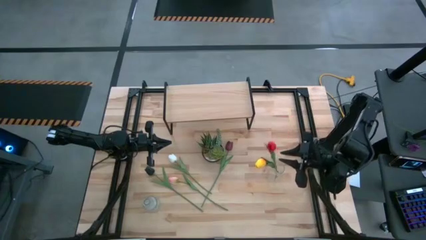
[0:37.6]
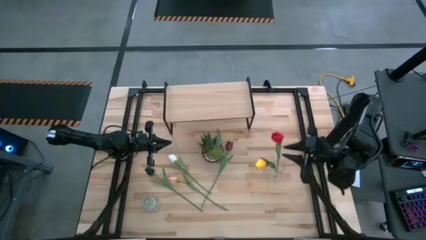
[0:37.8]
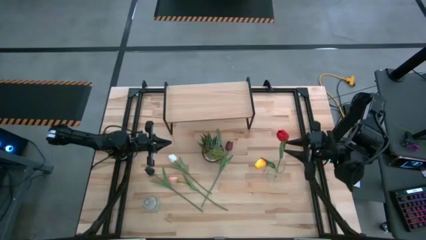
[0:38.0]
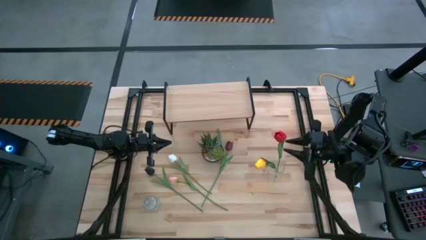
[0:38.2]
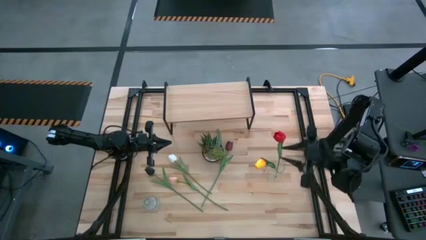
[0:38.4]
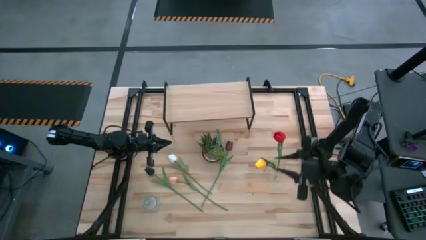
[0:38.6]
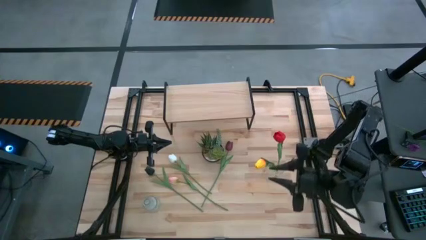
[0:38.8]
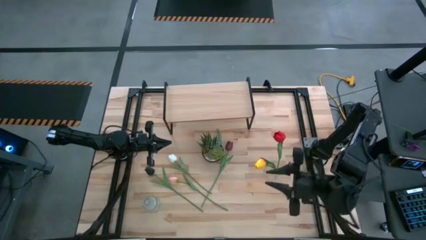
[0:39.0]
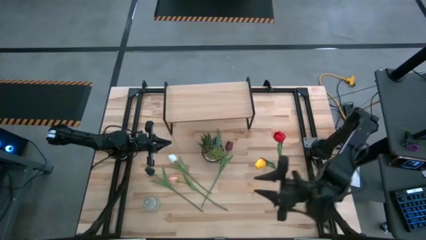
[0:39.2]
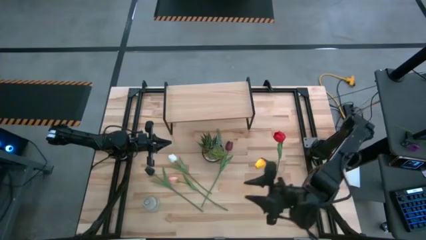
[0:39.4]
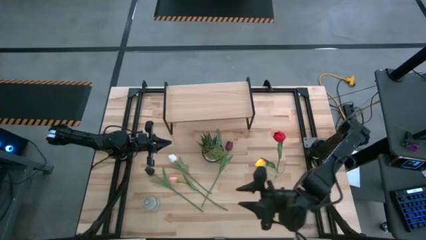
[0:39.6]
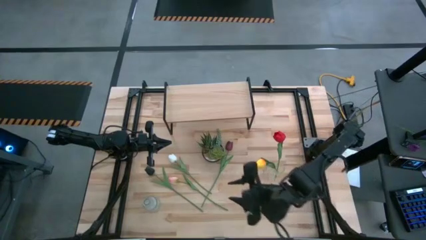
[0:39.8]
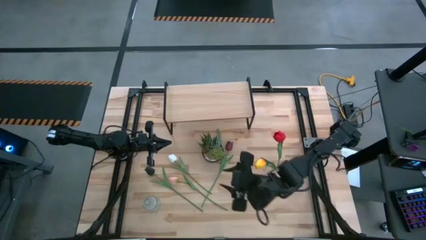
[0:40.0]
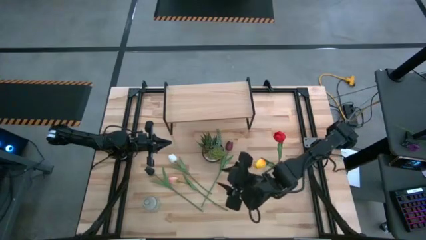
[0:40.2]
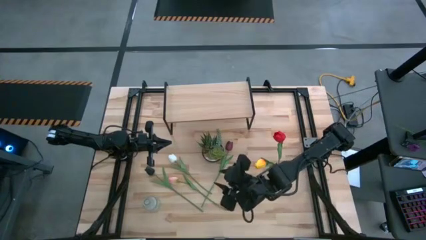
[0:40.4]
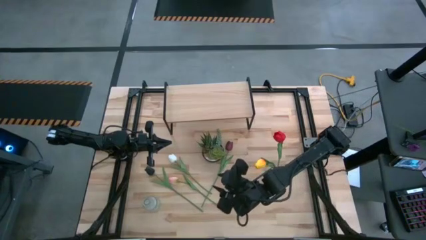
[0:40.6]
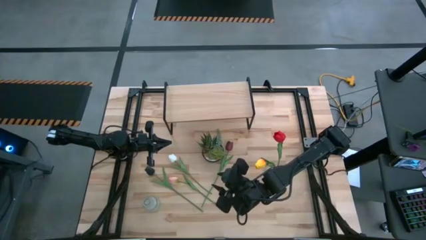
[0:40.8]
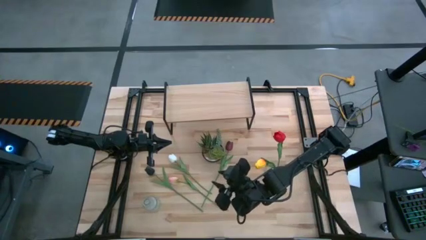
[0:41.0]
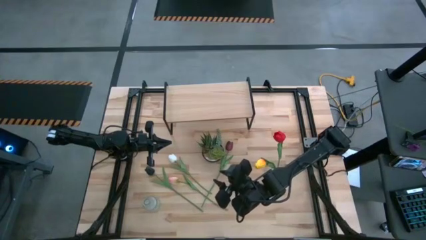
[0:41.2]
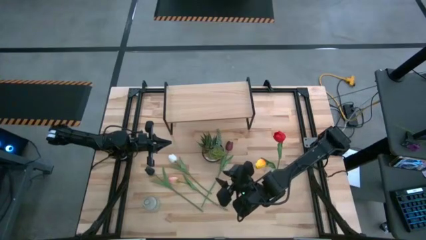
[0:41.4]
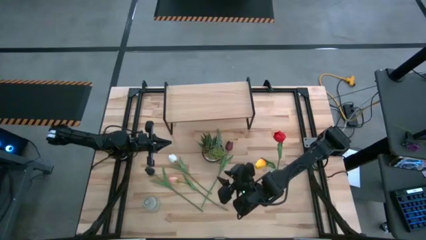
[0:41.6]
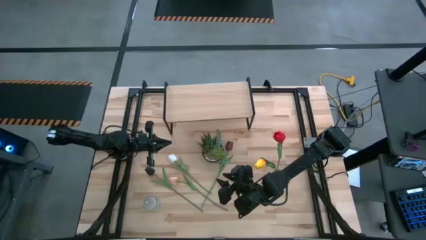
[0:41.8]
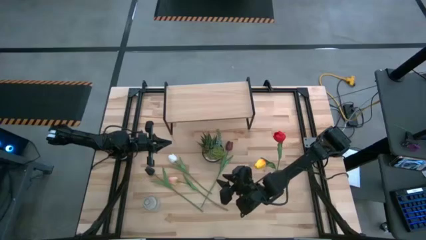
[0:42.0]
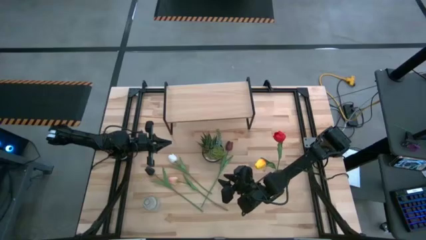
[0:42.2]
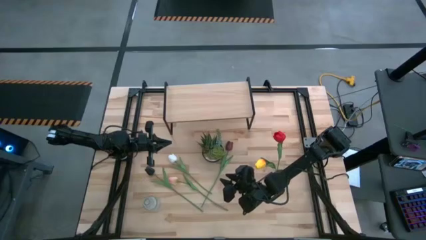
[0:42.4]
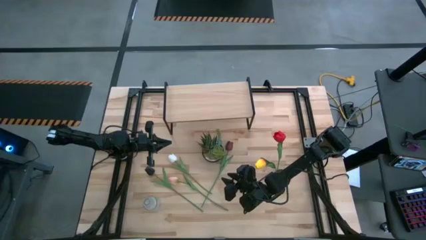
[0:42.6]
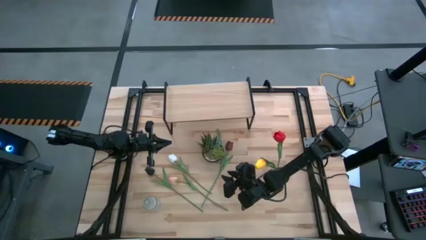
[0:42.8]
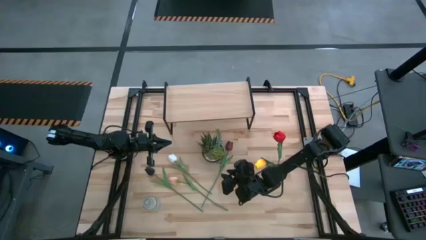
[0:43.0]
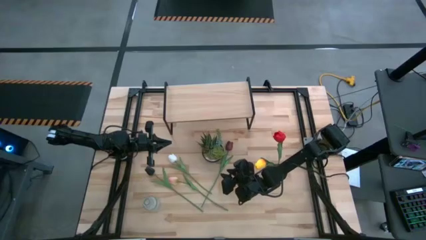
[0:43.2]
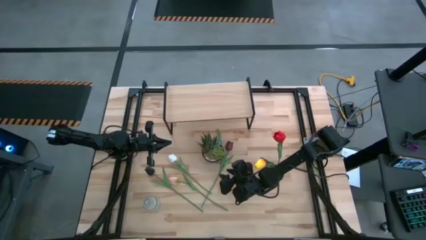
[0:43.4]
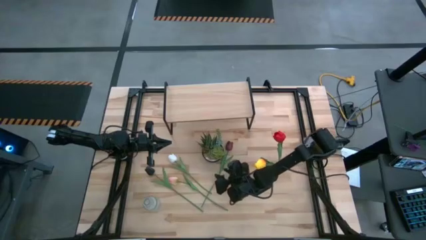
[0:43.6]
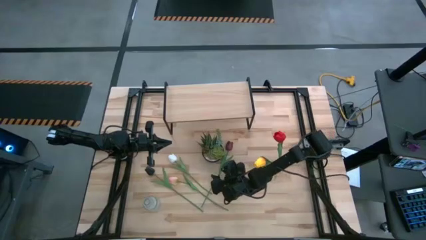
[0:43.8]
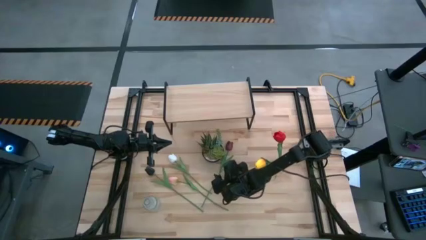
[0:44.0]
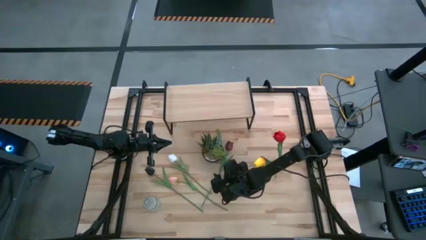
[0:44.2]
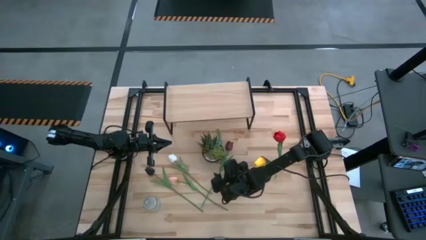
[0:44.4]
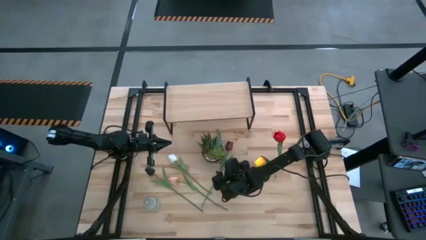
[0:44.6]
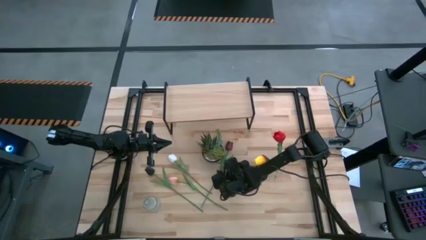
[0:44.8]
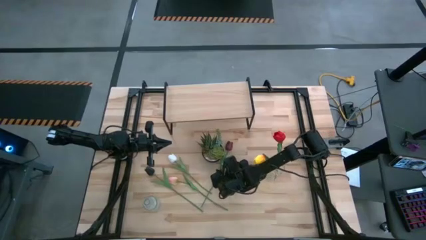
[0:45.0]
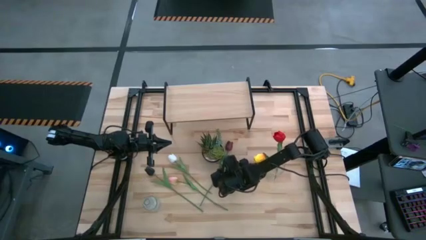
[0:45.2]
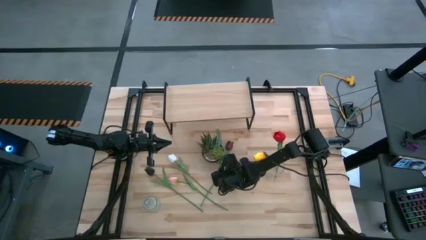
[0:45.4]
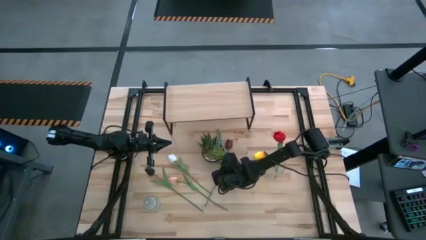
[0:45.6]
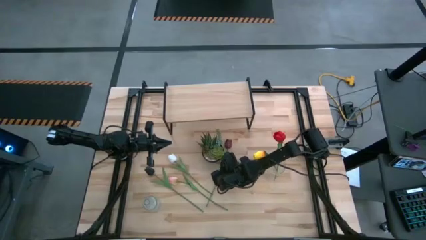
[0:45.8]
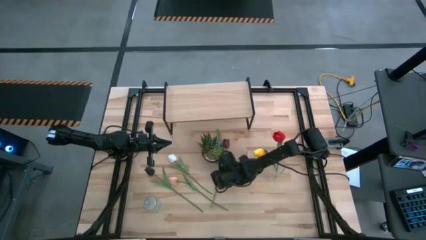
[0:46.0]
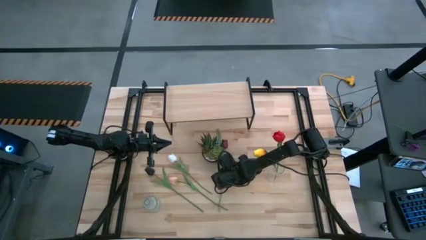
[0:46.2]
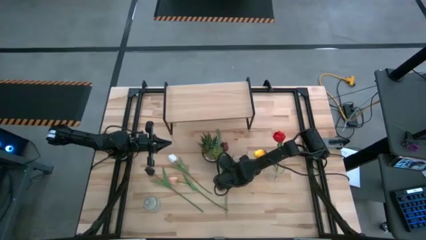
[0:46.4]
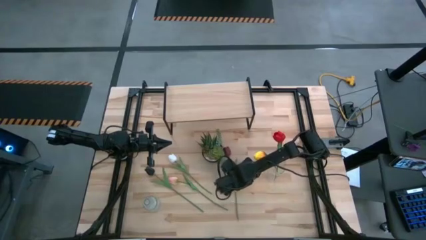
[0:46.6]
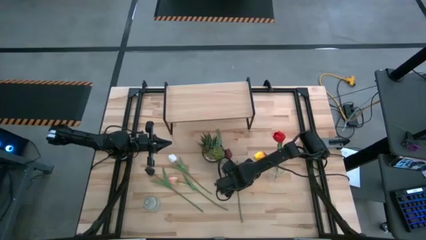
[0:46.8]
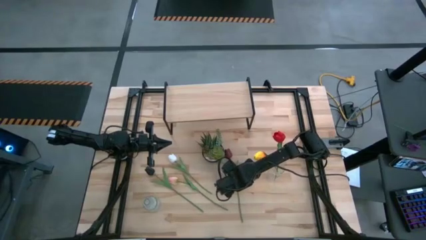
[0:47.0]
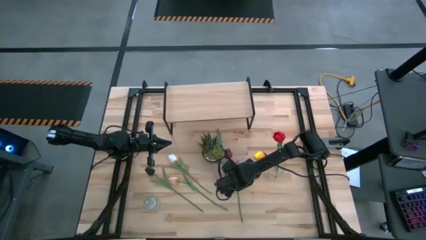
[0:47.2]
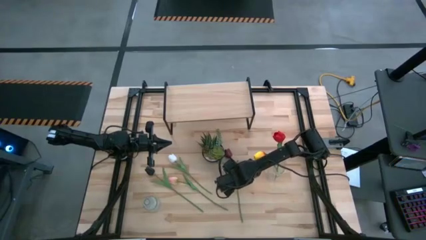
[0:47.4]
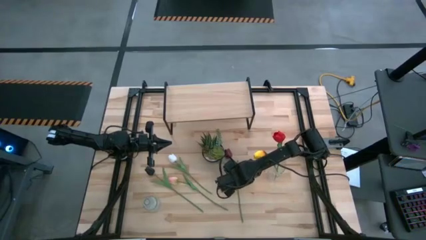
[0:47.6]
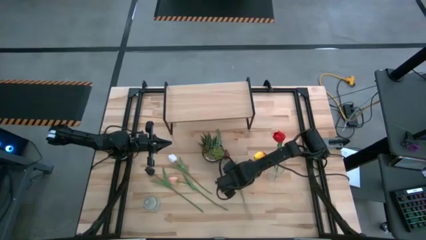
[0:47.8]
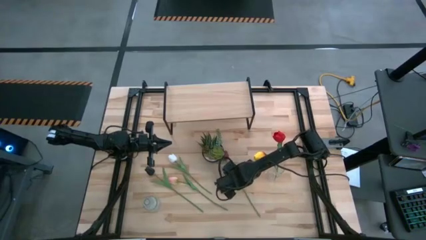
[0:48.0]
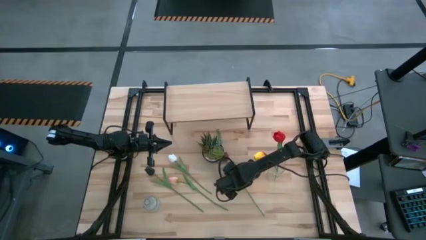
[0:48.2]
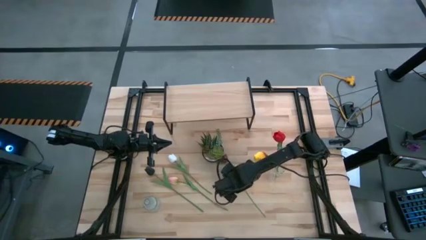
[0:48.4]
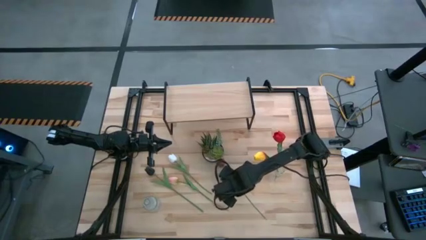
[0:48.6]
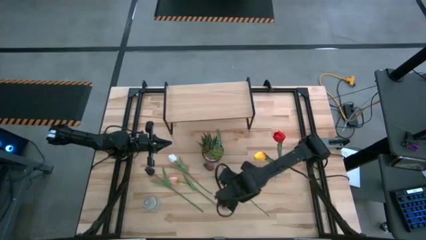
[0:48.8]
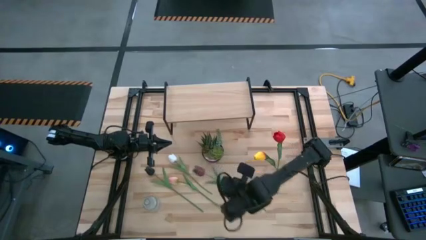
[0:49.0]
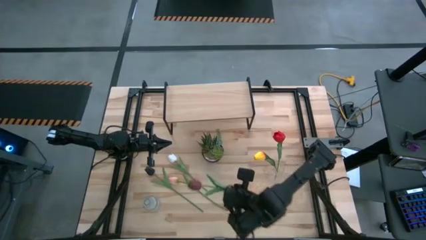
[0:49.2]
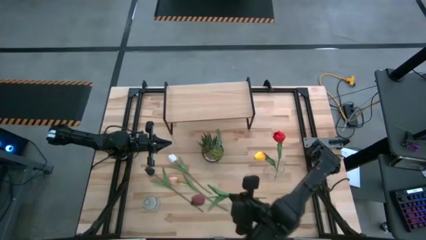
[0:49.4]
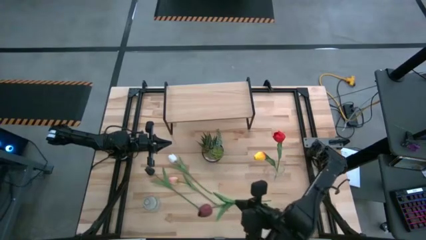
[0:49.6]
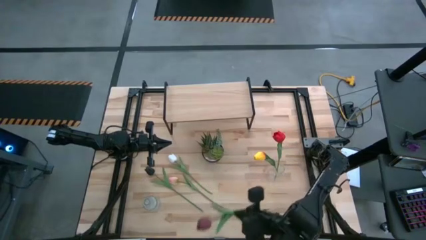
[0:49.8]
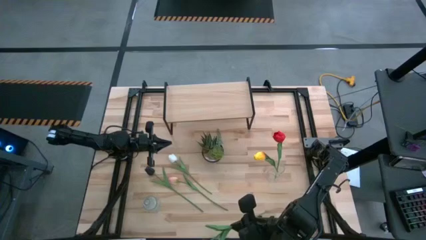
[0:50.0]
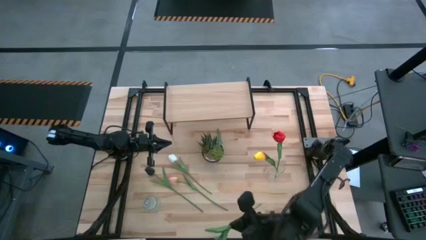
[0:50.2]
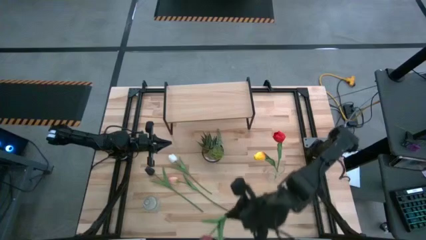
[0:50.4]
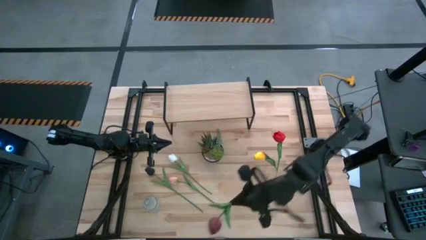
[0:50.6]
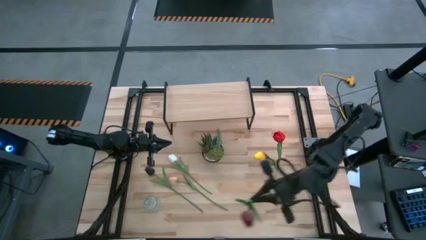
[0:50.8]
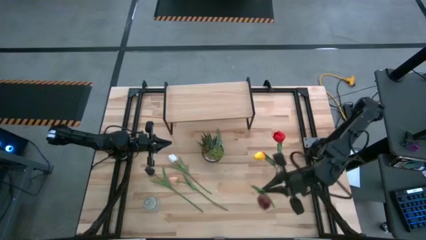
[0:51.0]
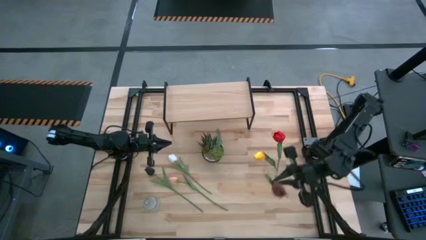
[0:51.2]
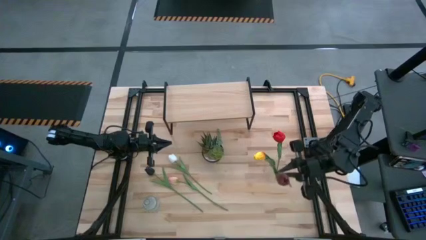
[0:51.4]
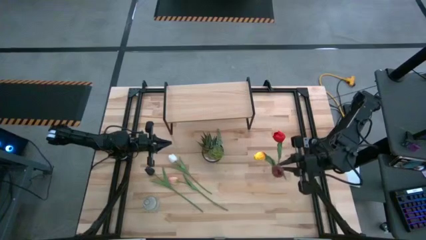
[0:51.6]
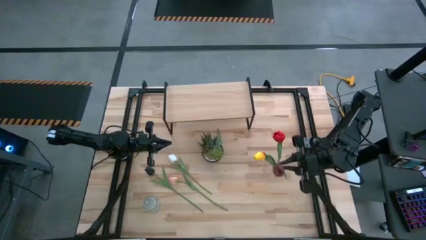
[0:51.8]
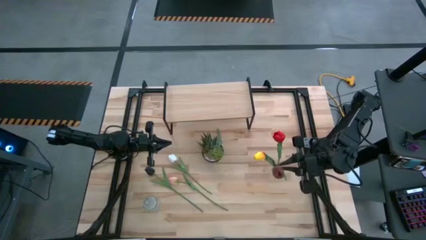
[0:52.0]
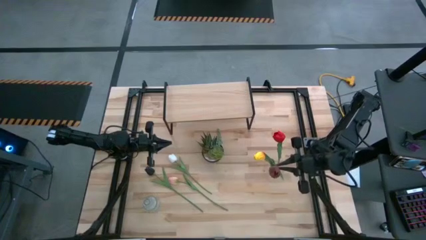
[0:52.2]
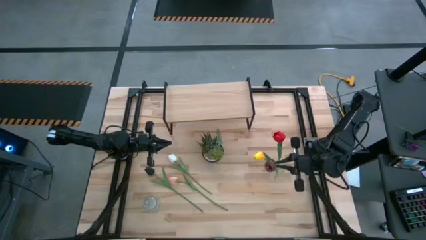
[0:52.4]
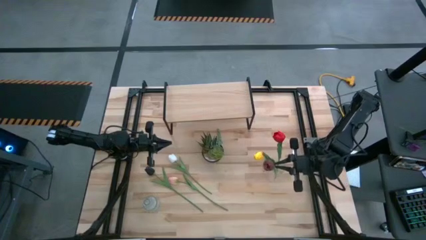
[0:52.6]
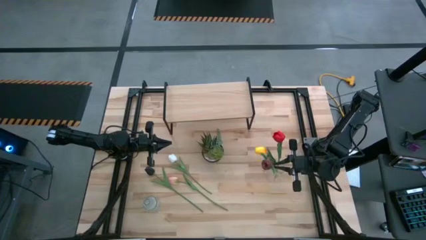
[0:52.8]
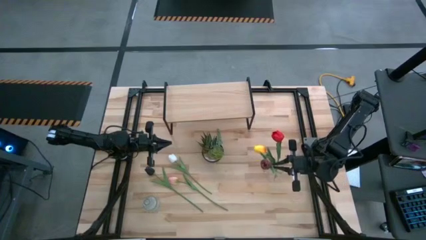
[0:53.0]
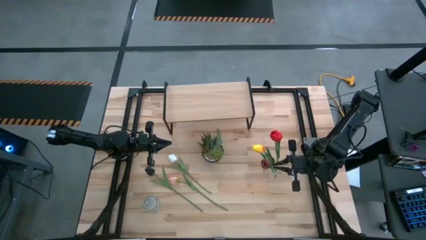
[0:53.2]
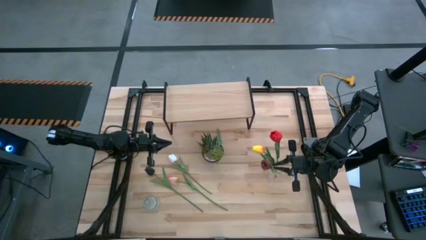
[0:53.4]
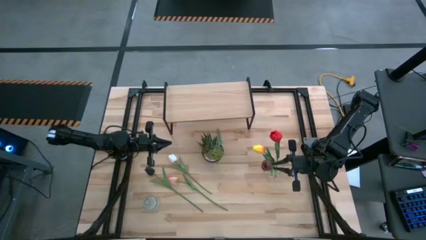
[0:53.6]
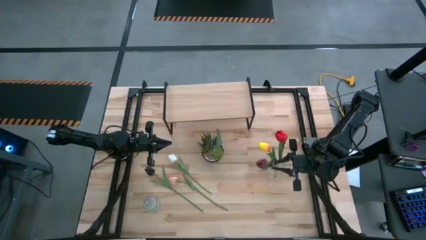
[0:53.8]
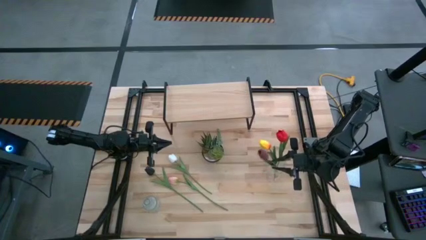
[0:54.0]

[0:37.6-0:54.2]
Task: Pick and place flowers into a vace then onto a shelf
Put the dark red flower into the right transparent vase
